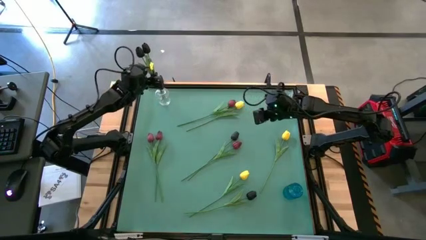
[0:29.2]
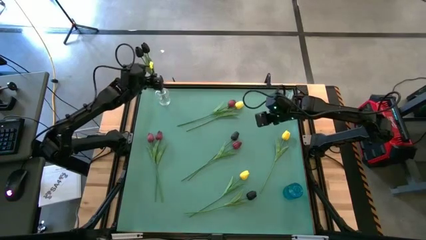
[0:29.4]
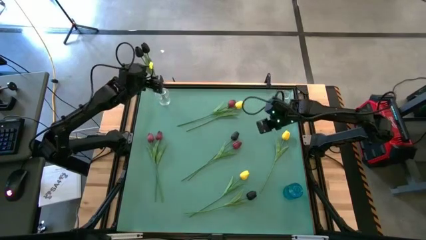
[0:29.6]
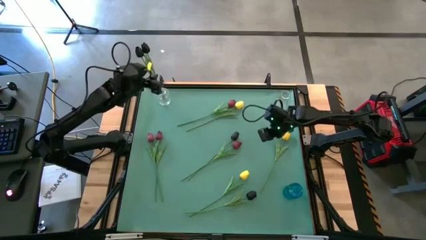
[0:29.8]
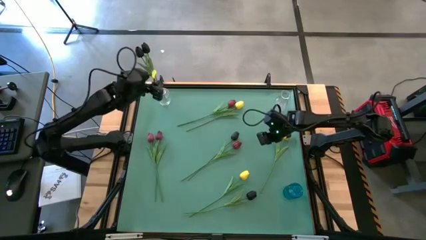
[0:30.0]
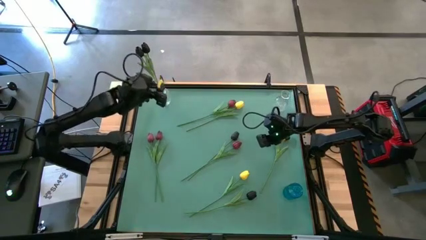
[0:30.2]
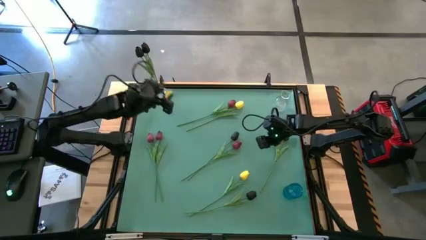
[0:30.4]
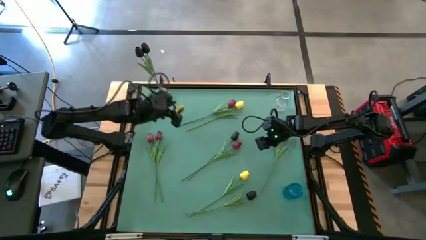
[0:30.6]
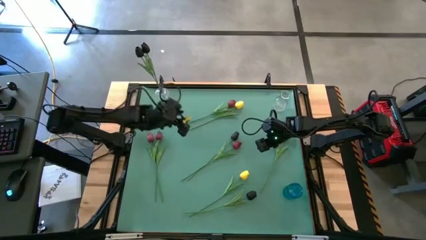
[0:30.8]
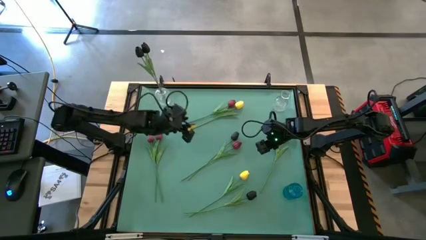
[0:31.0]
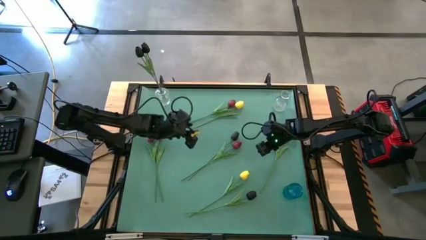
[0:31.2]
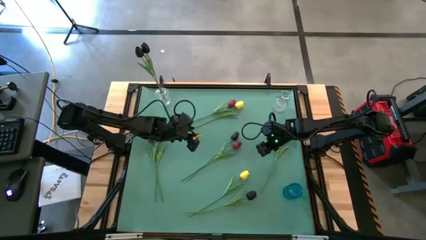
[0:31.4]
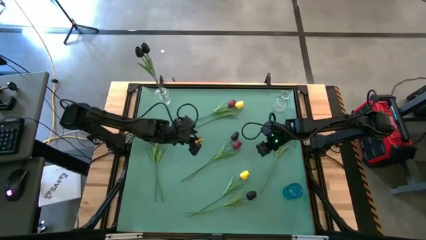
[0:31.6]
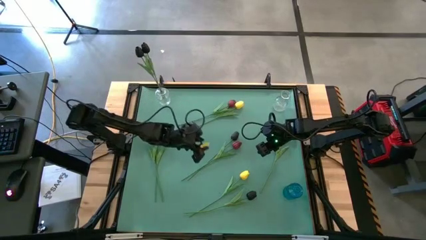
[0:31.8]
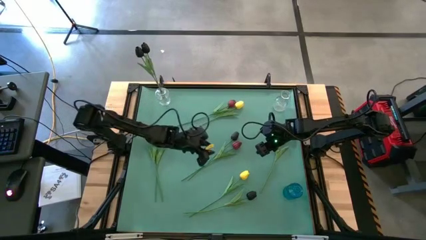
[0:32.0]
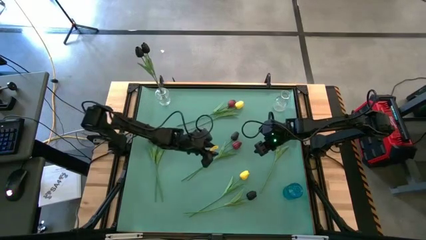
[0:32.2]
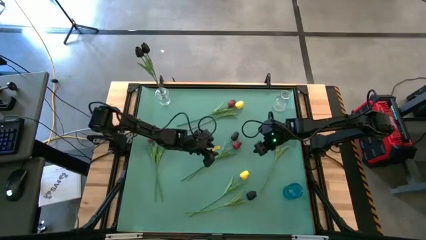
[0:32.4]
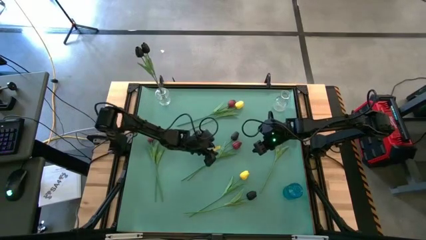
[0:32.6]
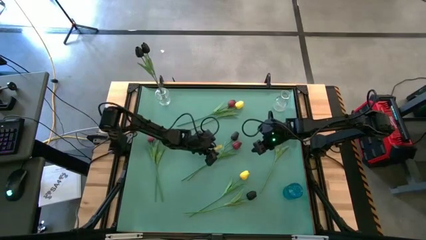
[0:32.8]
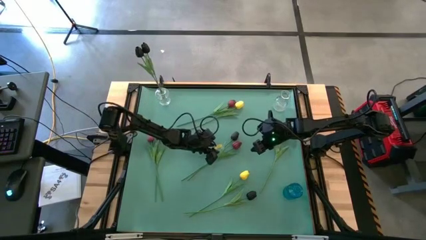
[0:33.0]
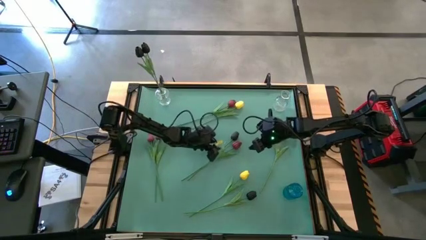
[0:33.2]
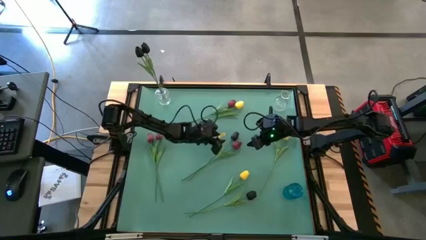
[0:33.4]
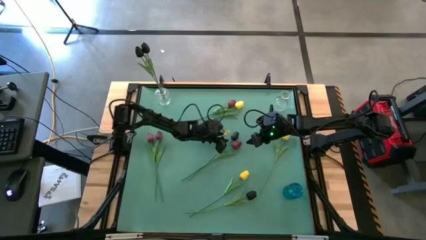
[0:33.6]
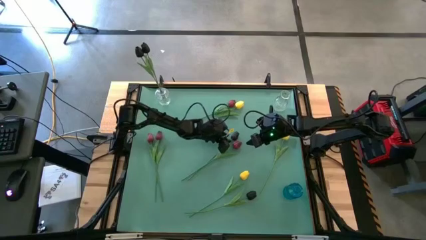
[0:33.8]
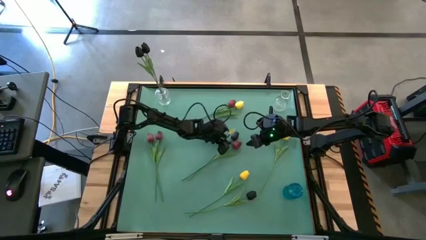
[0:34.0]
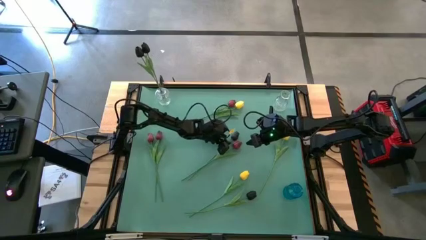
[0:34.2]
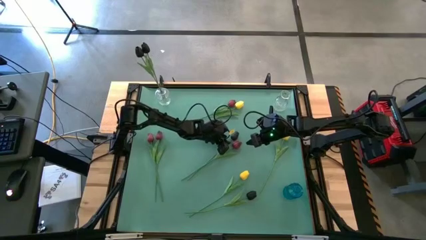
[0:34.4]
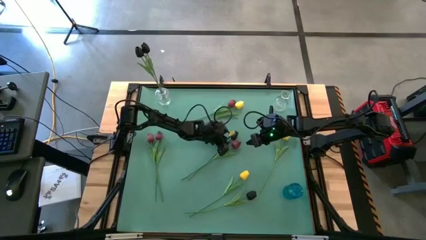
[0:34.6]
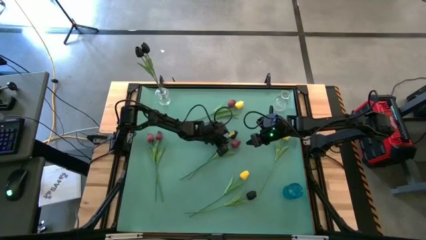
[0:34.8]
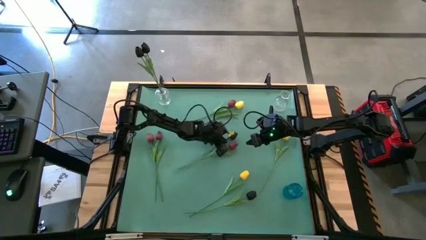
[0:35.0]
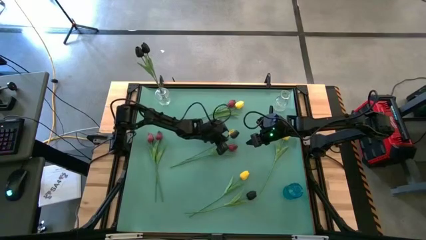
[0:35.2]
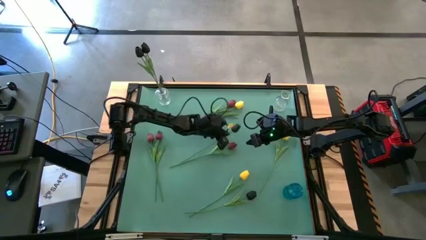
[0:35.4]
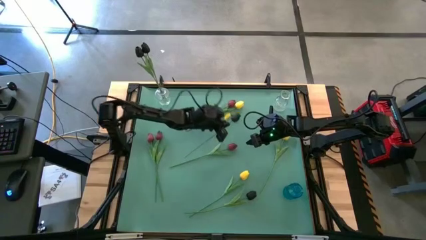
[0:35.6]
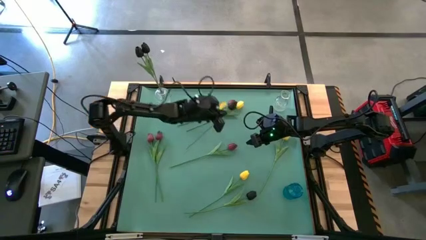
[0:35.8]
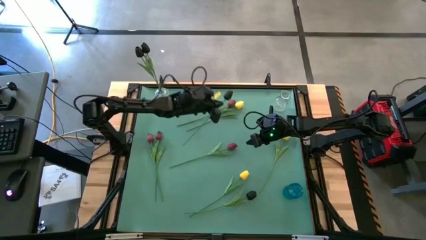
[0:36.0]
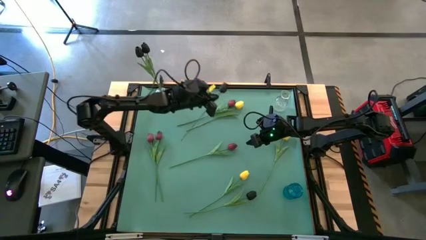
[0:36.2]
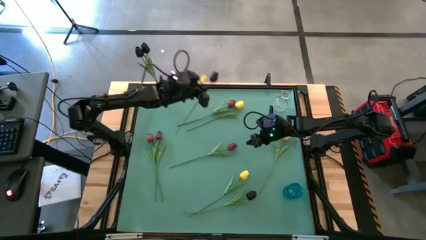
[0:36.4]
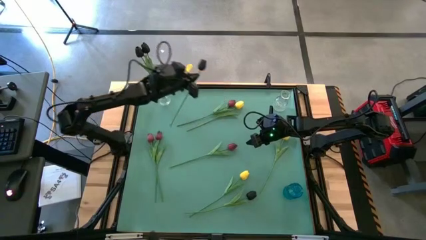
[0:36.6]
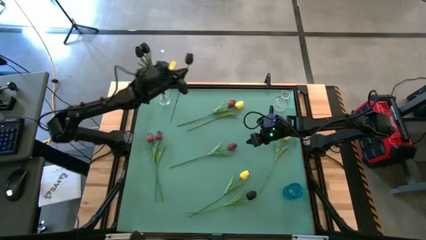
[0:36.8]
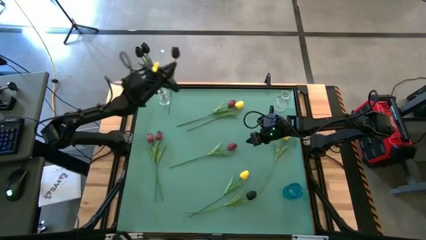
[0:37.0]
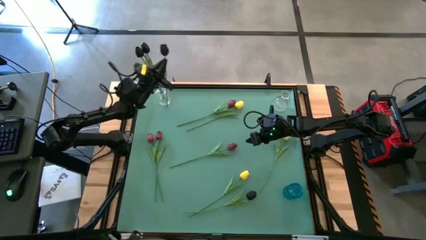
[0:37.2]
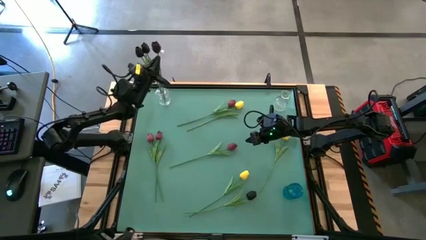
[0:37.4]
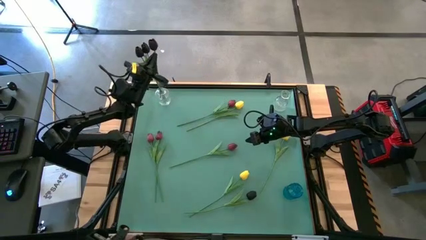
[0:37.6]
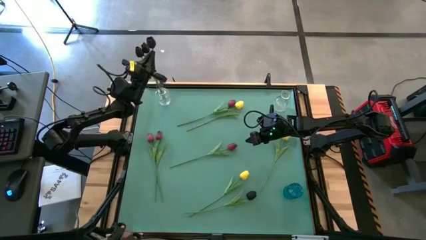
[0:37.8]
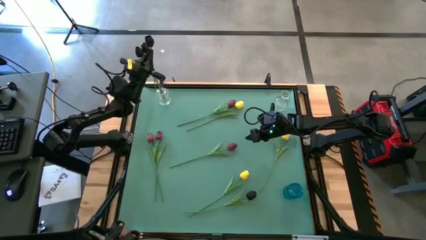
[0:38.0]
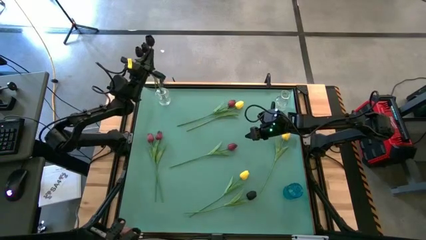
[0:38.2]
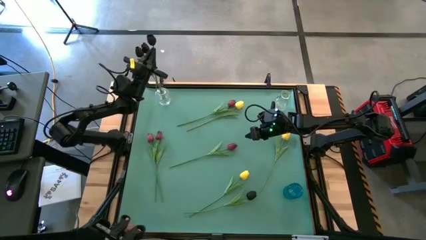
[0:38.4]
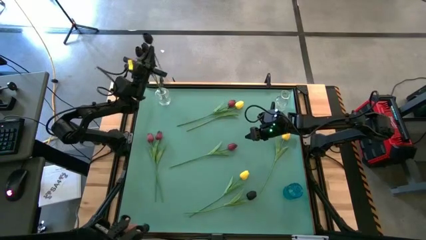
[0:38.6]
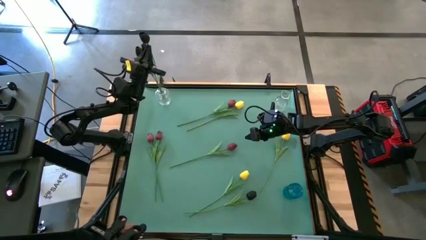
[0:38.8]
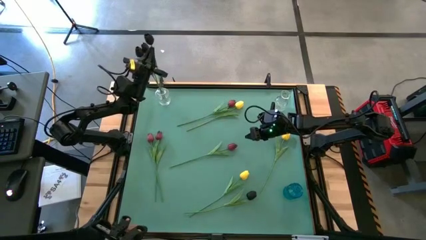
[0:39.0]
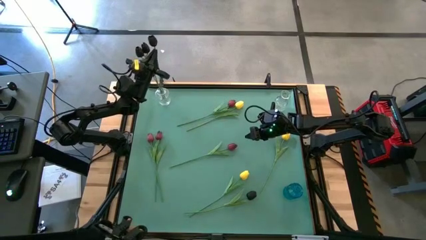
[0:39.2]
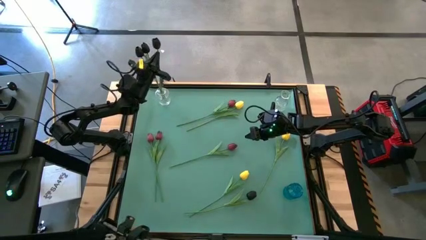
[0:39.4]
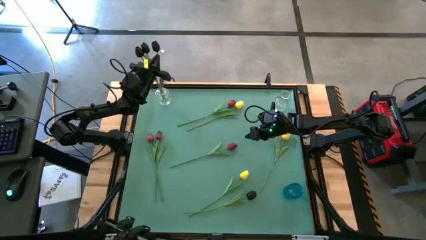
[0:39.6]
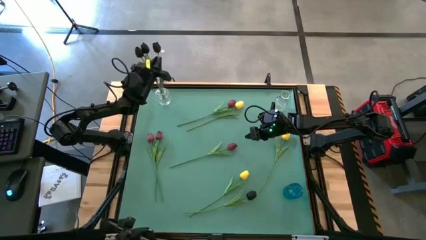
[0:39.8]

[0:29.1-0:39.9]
Task: Sort flowers into vase by color
Put the black flower into the left transparent vase
